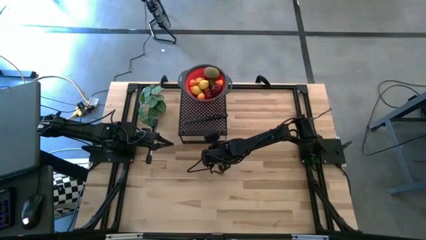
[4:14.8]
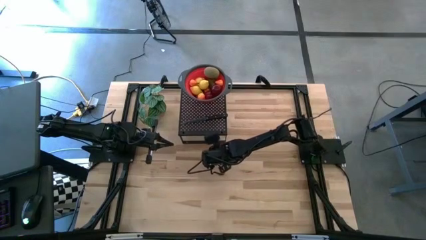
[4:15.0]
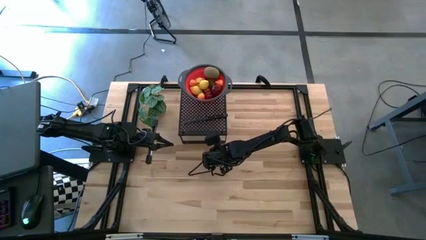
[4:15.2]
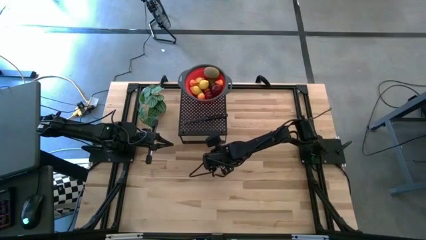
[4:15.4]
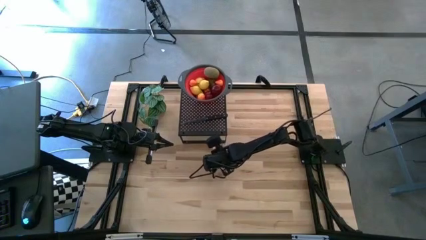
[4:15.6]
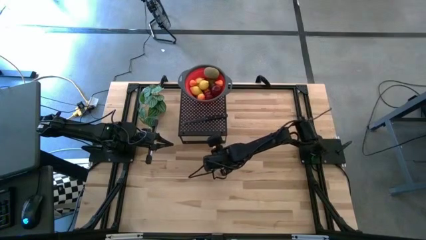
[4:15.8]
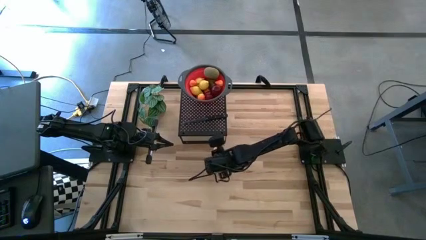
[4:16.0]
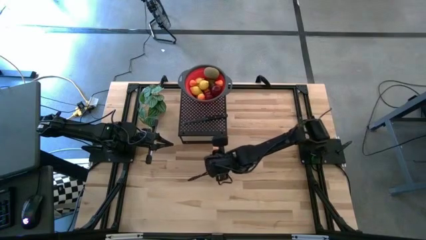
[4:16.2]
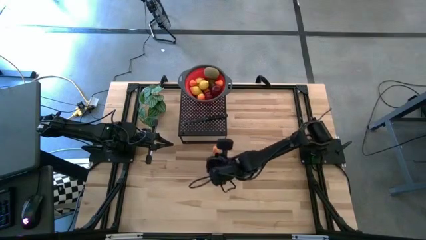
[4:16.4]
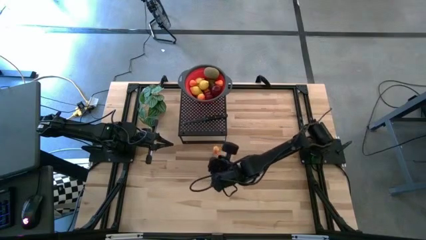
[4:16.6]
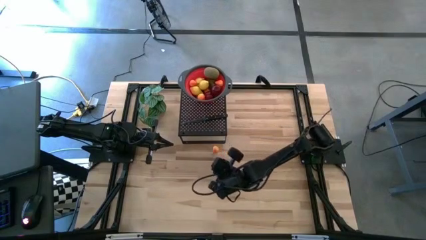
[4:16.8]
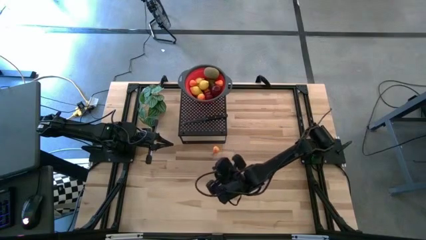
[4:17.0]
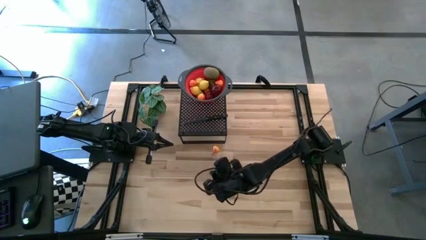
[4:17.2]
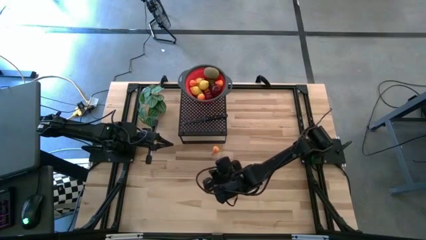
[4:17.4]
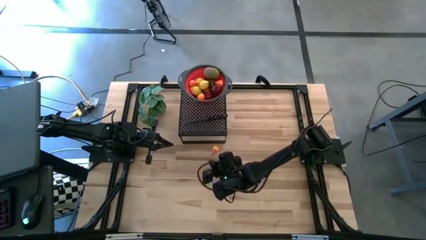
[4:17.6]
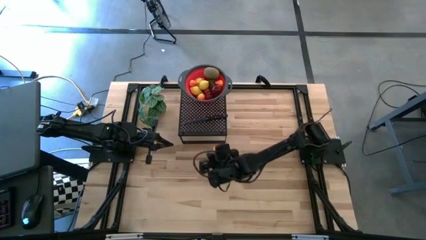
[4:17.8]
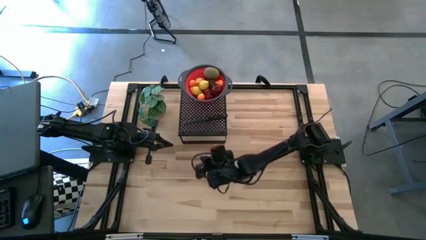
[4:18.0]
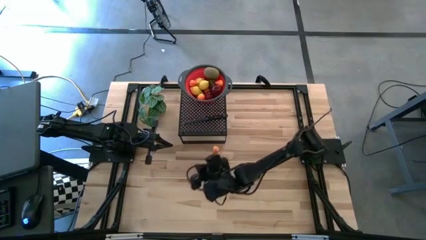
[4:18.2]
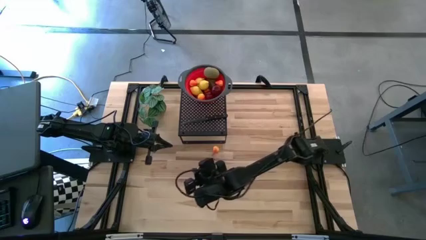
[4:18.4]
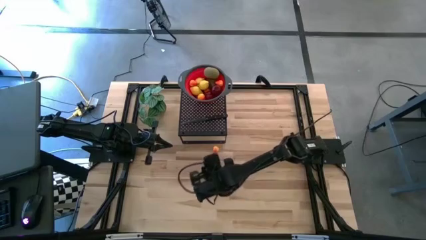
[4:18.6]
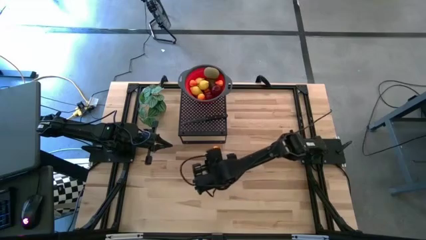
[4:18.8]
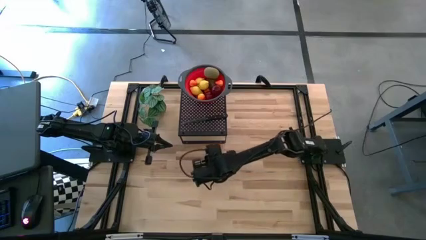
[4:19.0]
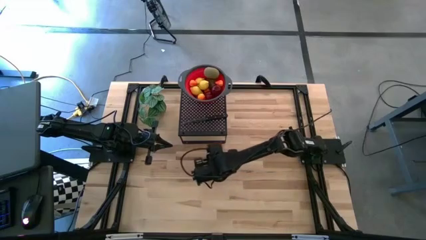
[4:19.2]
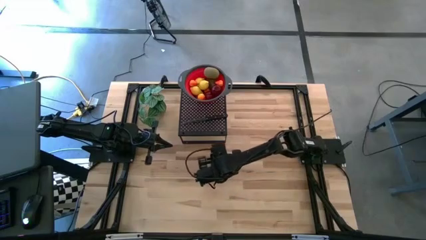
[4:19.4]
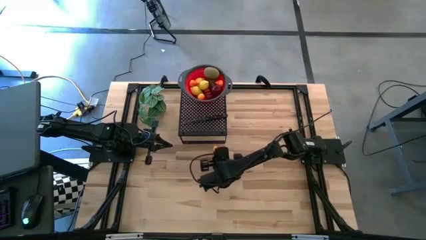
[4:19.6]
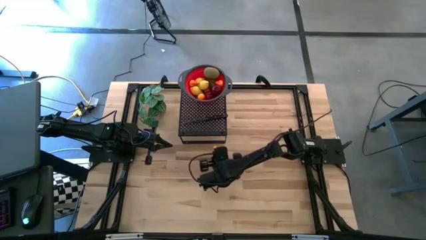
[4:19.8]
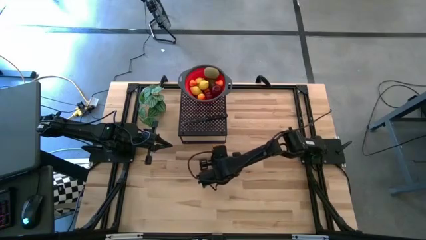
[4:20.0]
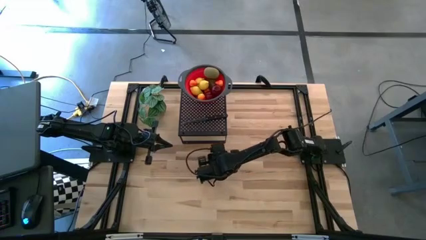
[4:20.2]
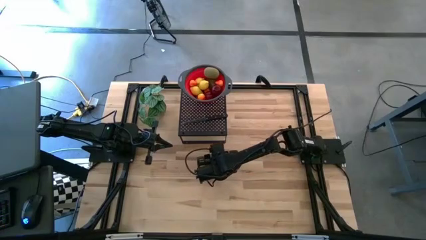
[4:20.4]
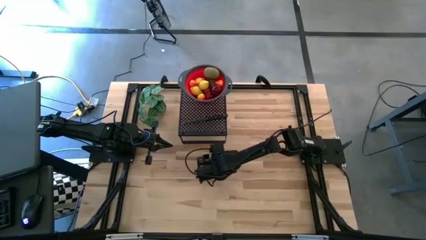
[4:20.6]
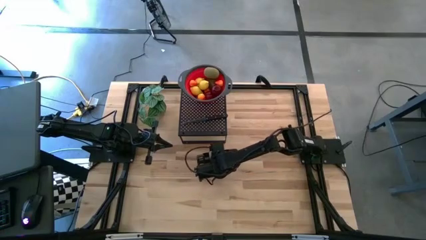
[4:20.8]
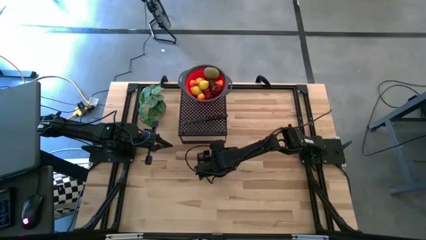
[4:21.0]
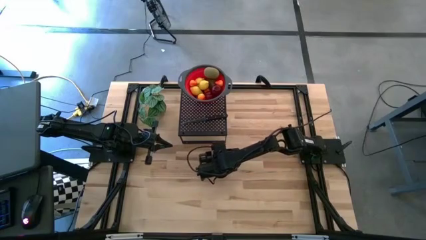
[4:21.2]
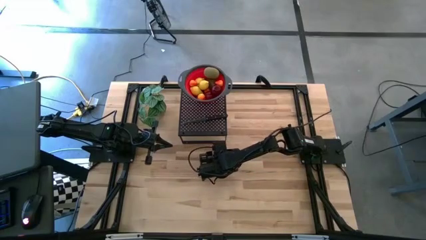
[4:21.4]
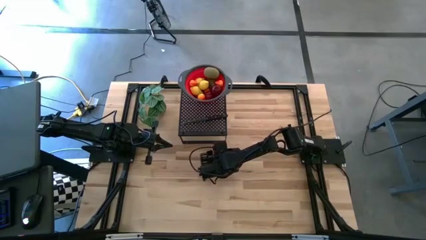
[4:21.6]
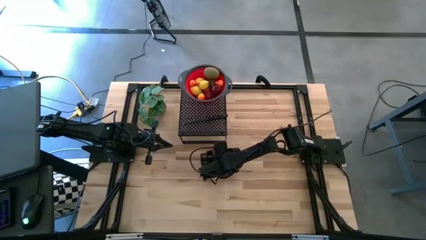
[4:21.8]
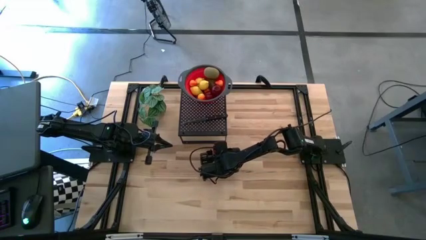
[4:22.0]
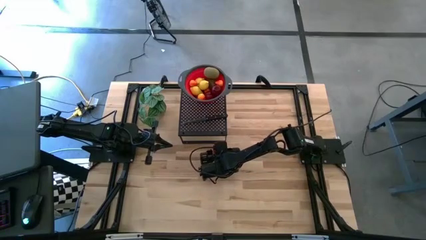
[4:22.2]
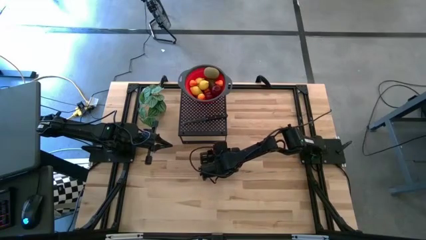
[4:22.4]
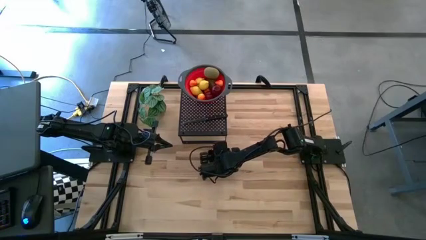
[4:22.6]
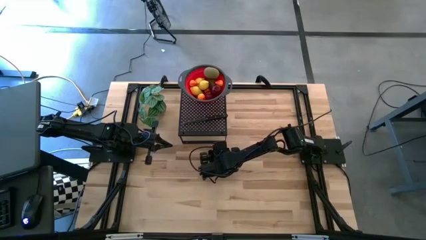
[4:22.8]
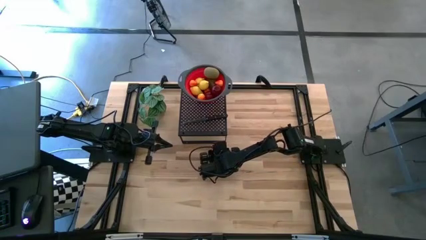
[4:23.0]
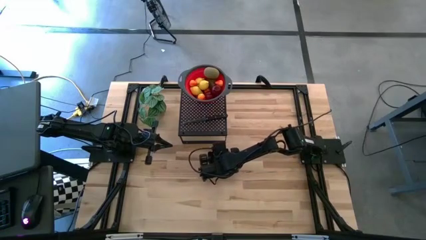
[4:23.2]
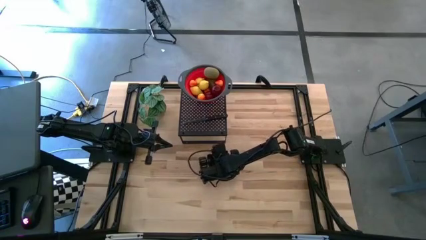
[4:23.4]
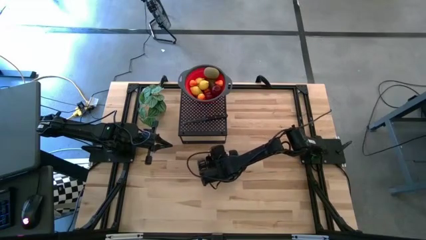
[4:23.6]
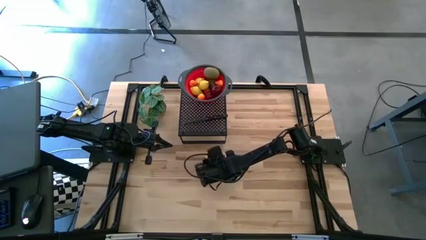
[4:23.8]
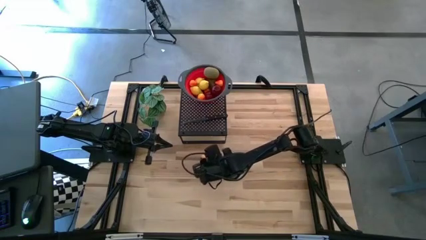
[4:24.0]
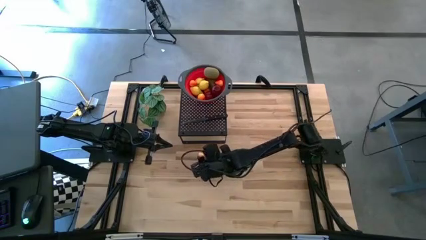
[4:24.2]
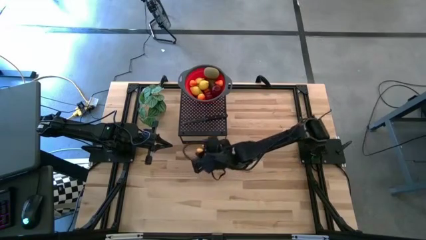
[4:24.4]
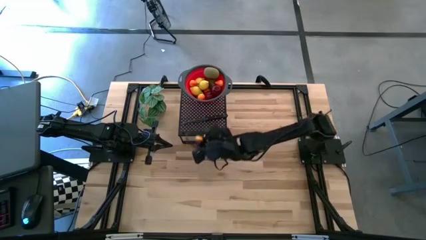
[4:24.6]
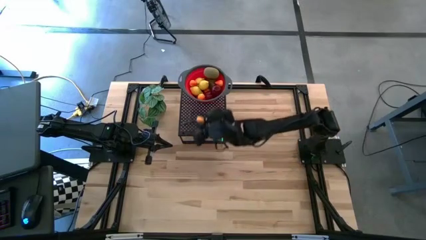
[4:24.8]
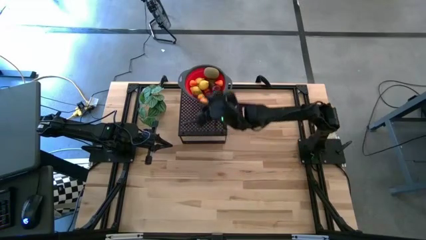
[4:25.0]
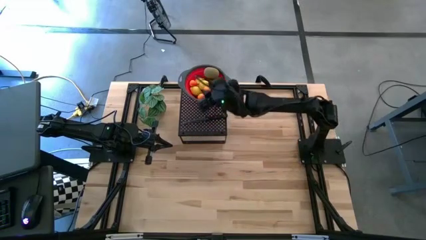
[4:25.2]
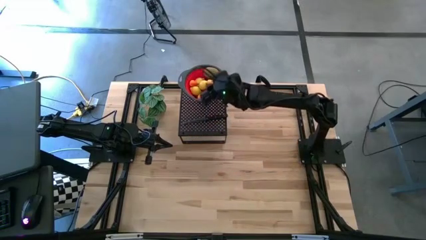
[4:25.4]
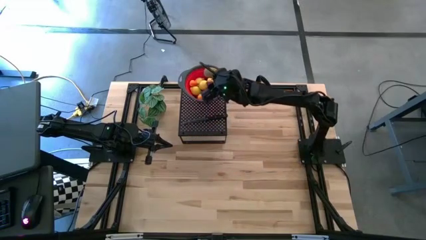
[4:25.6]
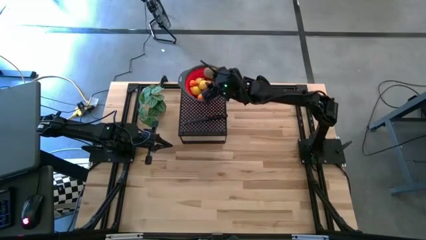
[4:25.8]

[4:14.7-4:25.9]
Task: Pick & Place Fruit
Put the pear into the red strainer bowl

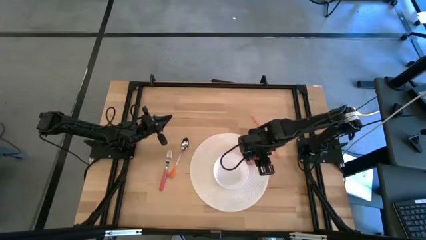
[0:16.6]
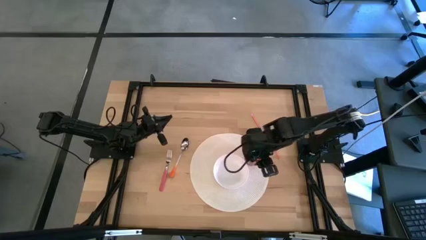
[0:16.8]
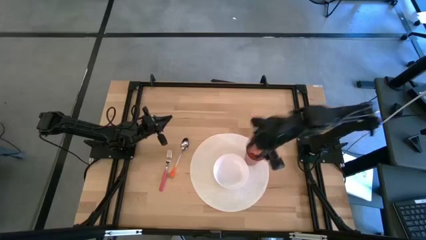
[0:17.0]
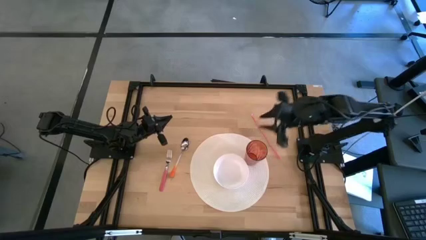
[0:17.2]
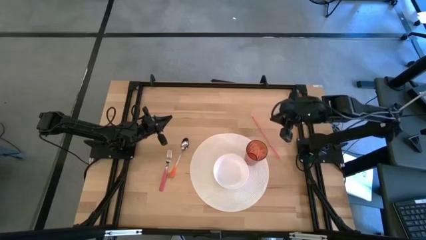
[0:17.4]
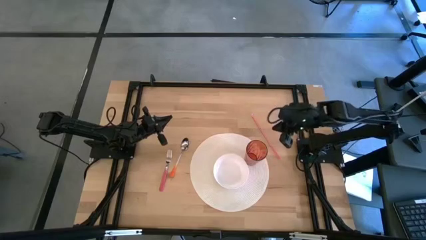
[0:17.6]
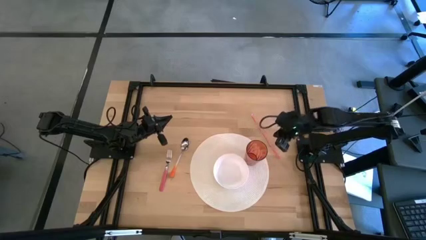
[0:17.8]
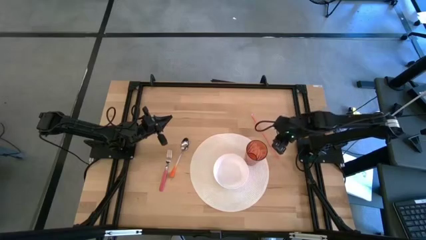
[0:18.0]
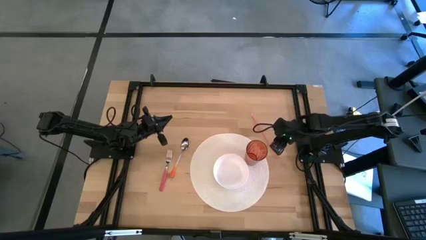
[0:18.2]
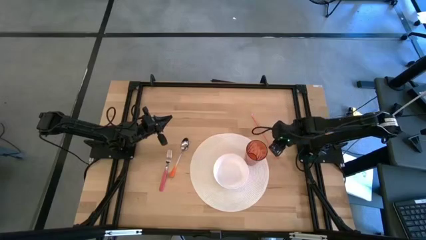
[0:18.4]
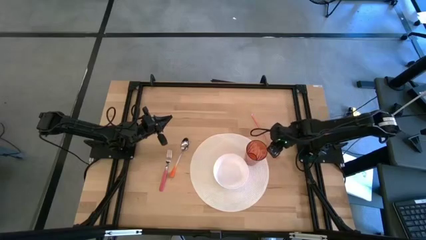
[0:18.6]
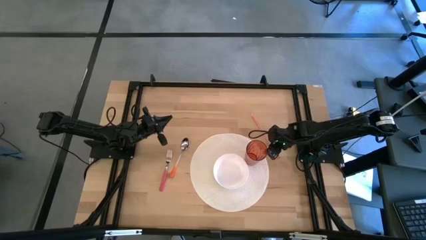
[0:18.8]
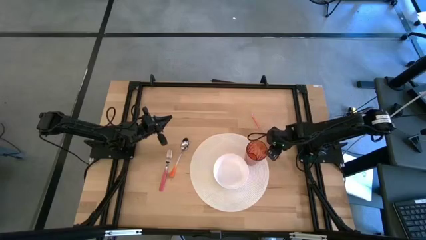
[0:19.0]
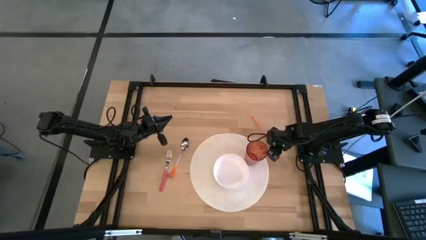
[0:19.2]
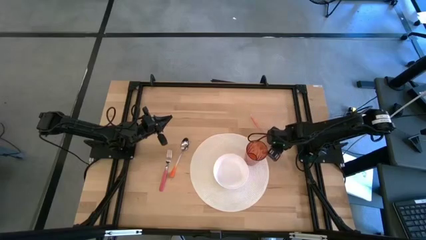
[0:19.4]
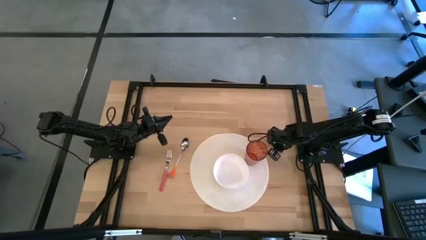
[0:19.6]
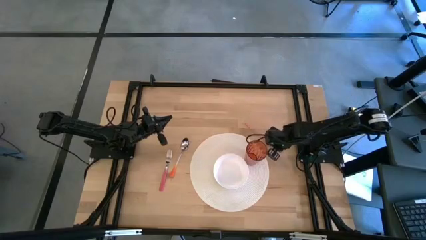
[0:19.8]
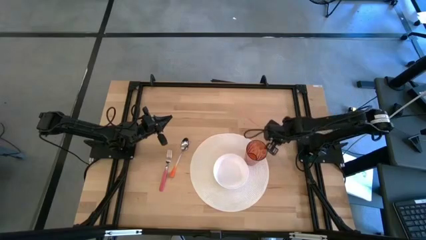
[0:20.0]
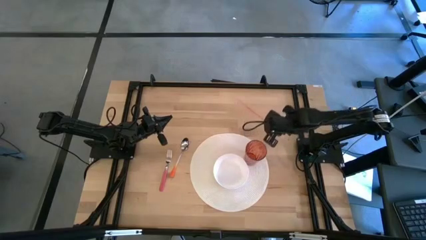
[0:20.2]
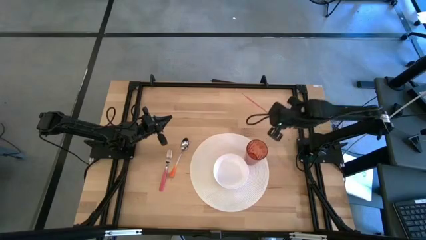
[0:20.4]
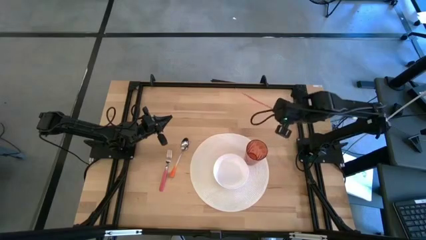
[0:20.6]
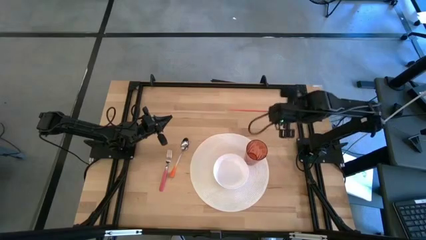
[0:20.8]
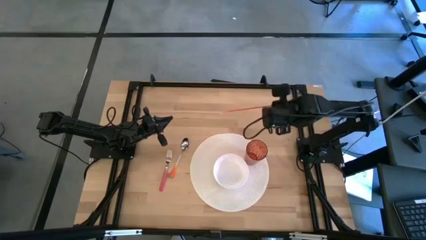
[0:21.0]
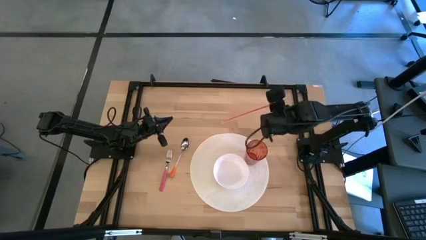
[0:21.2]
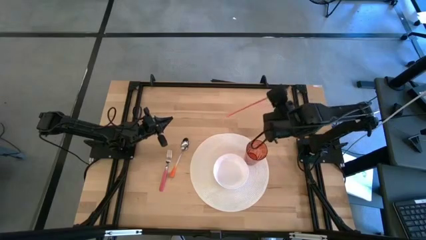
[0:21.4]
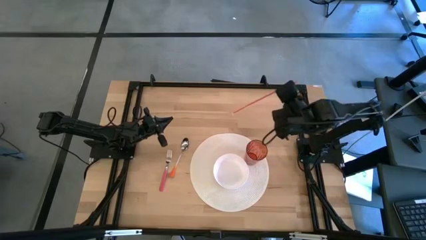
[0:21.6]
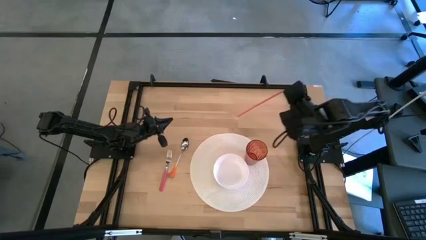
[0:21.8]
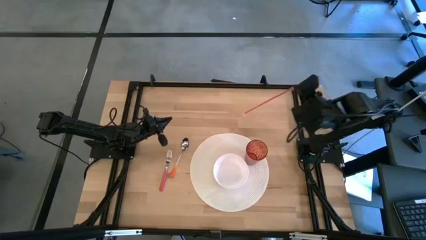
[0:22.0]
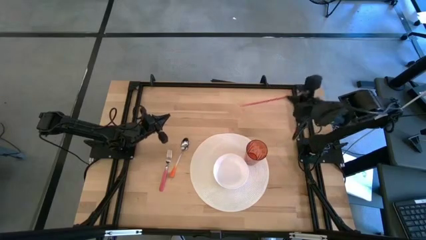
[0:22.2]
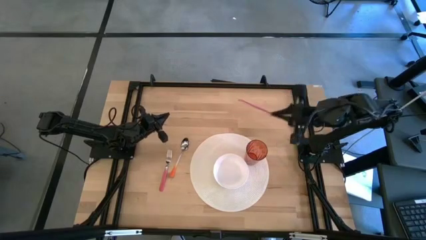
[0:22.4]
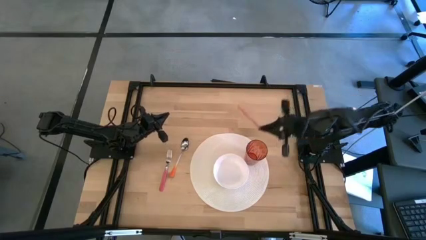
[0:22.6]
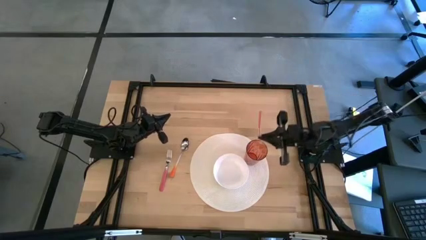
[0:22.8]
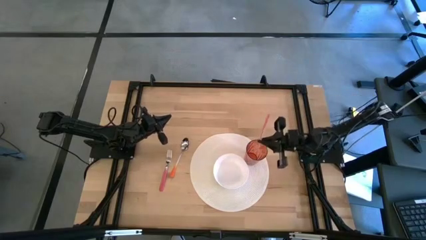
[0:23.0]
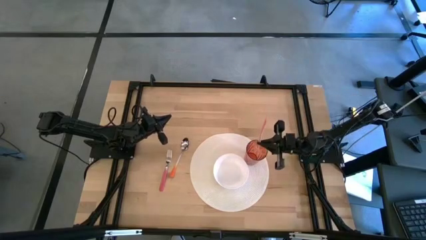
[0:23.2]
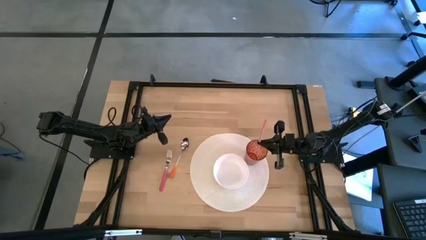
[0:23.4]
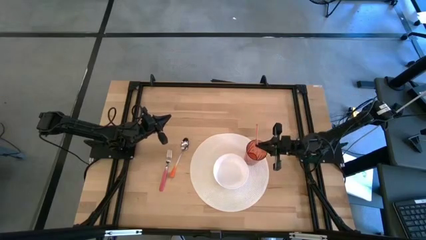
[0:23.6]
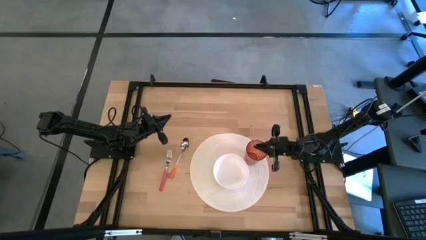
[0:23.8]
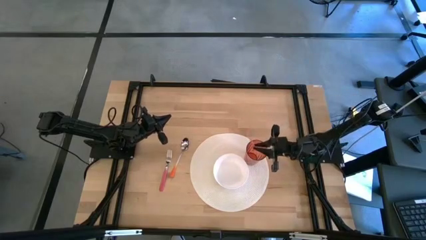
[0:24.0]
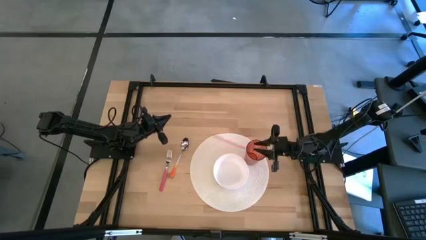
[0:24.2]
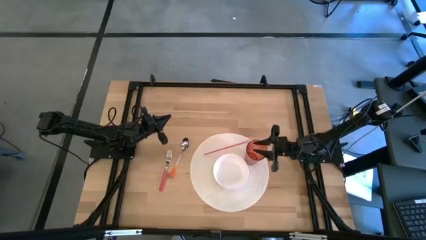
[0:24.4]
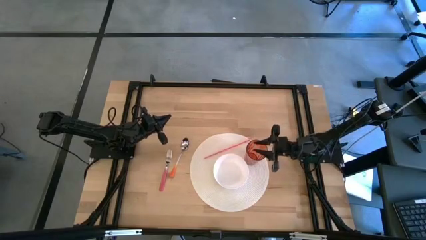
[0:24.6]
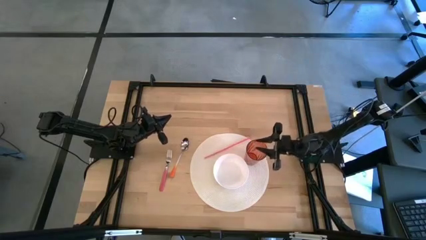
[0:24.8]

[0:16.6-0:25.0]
Task: Pick & Place Utensil
Put the red straw into the brown cup
